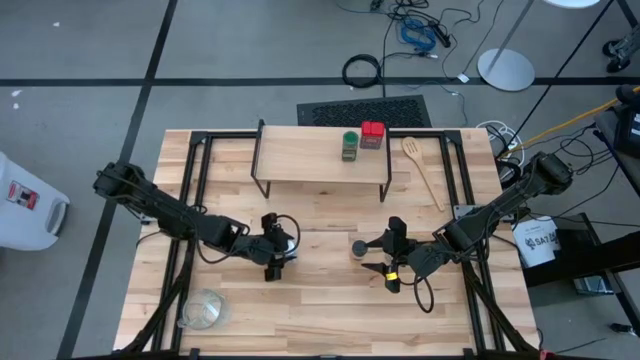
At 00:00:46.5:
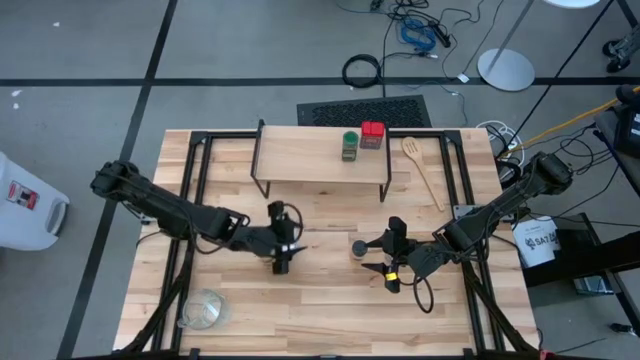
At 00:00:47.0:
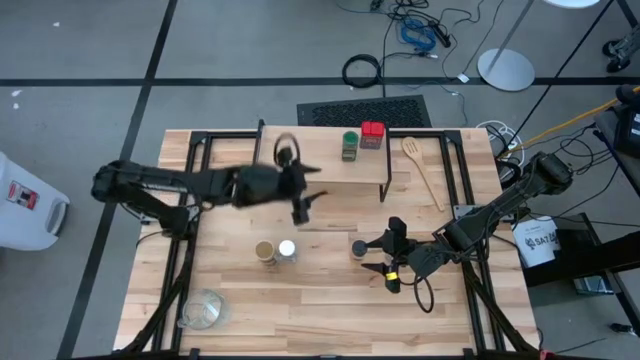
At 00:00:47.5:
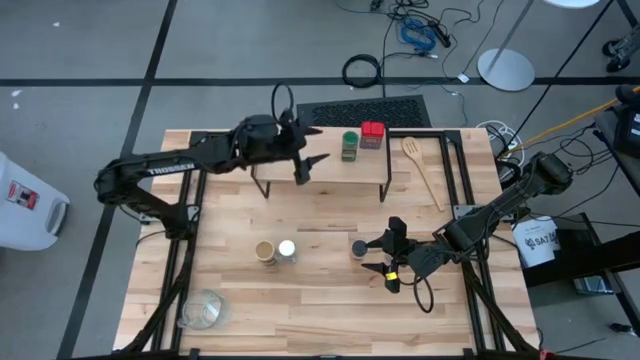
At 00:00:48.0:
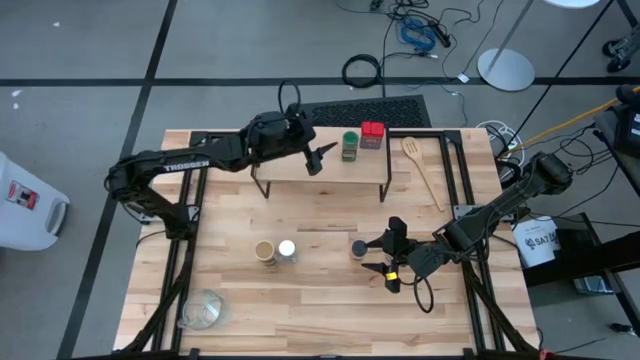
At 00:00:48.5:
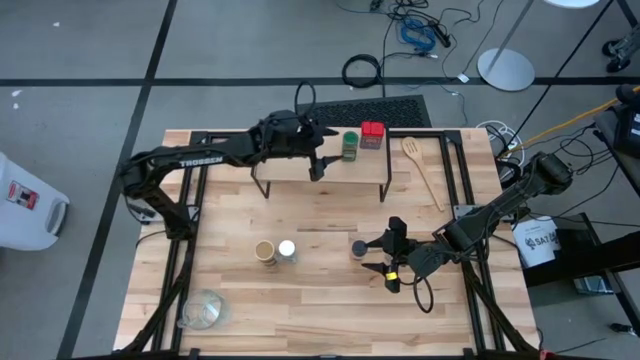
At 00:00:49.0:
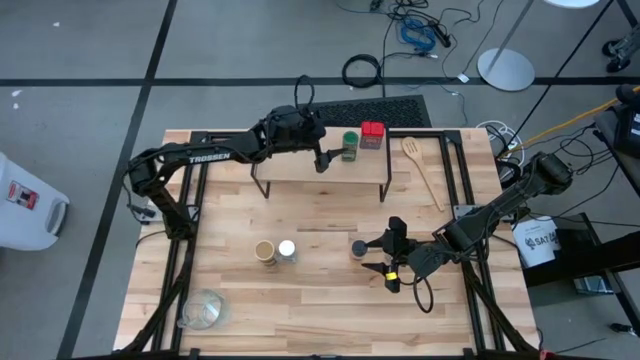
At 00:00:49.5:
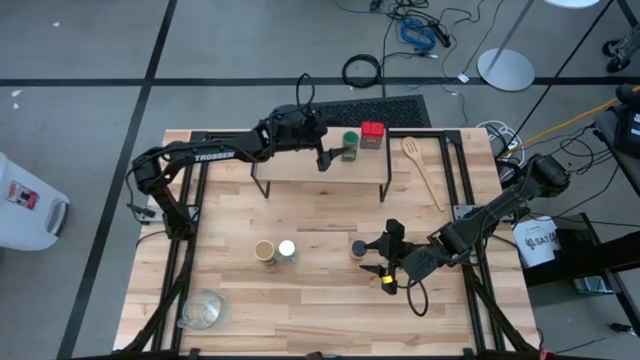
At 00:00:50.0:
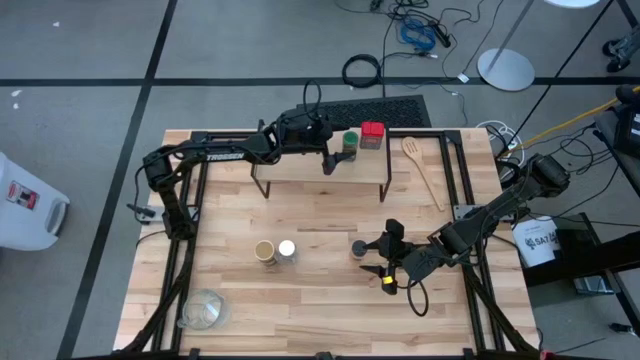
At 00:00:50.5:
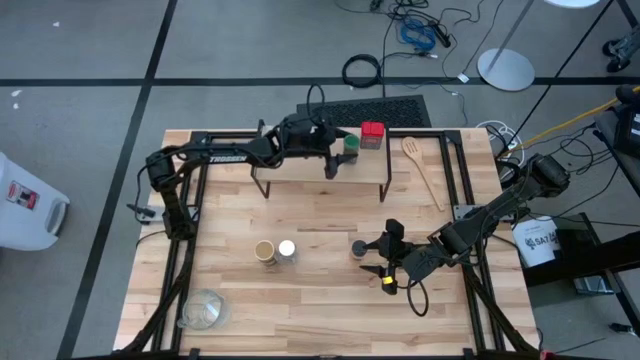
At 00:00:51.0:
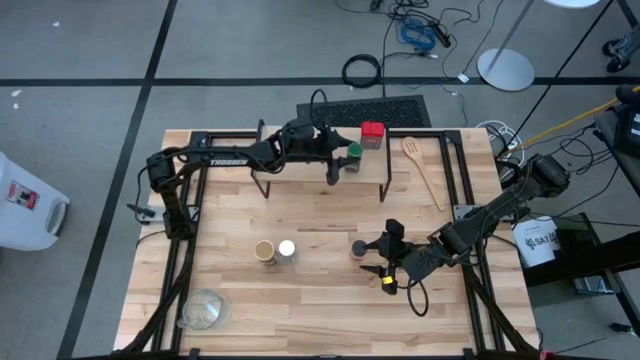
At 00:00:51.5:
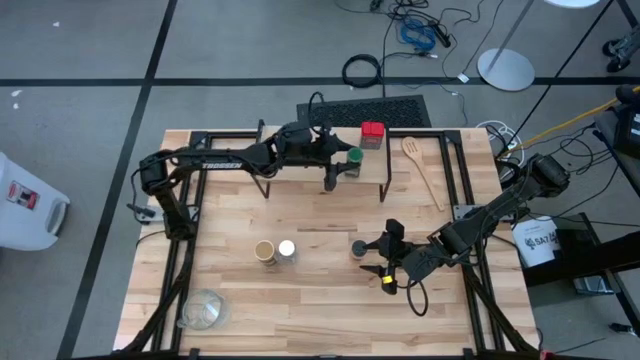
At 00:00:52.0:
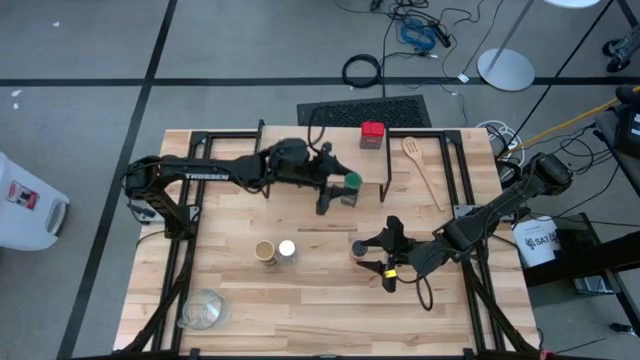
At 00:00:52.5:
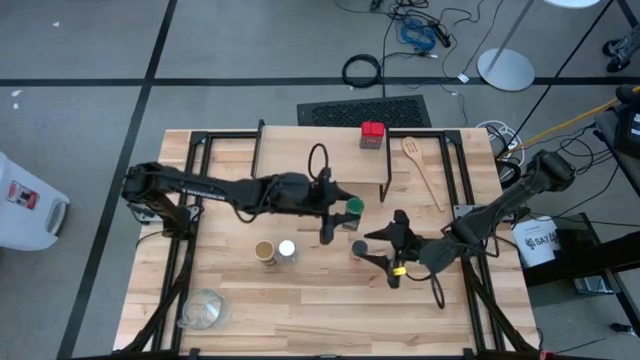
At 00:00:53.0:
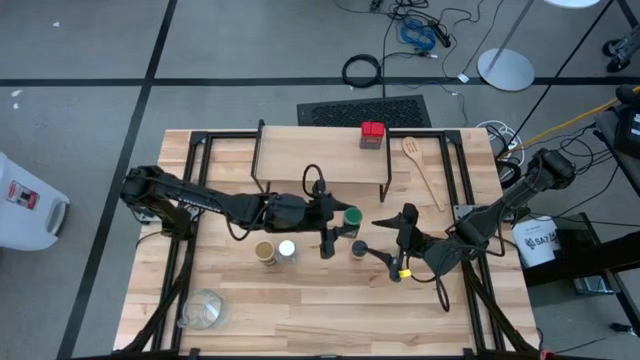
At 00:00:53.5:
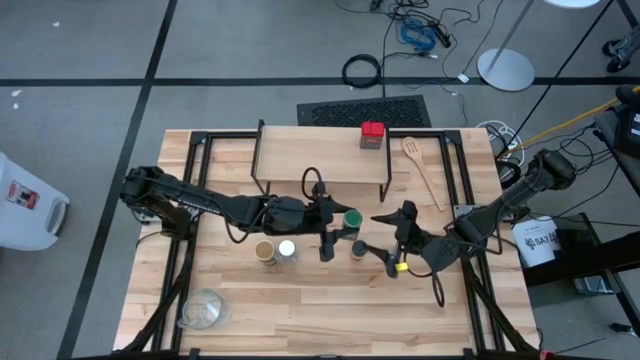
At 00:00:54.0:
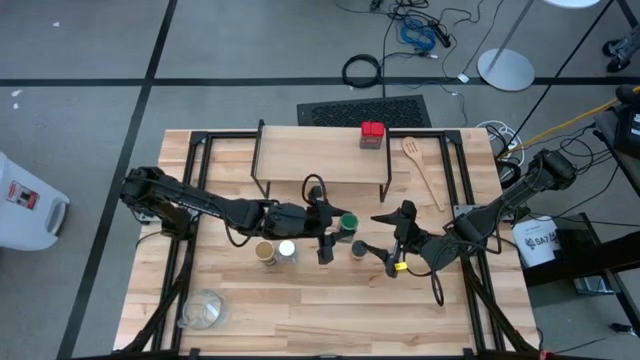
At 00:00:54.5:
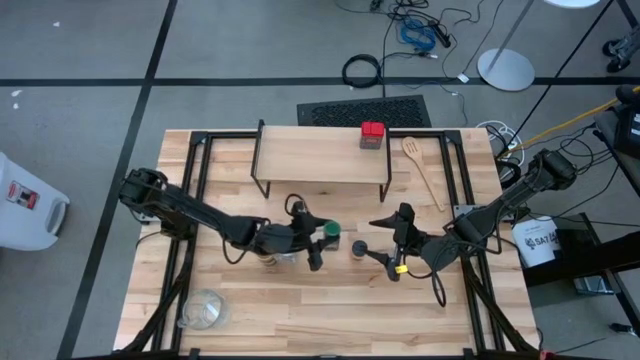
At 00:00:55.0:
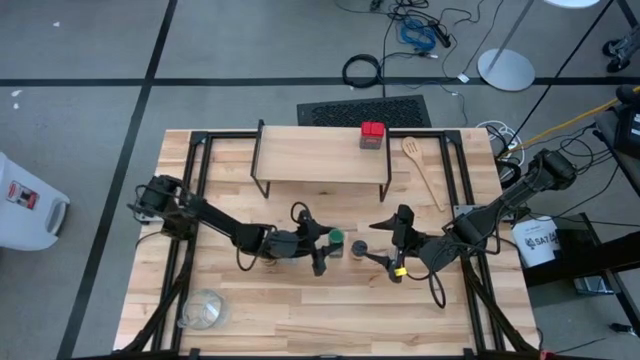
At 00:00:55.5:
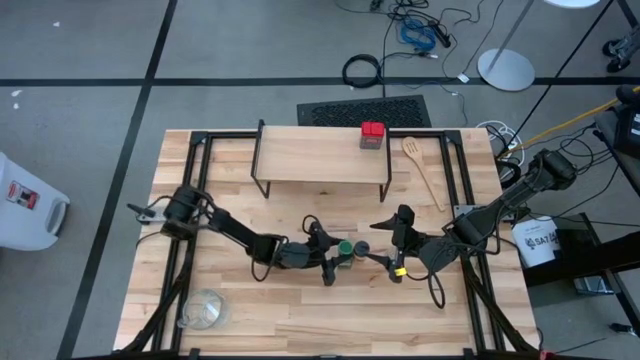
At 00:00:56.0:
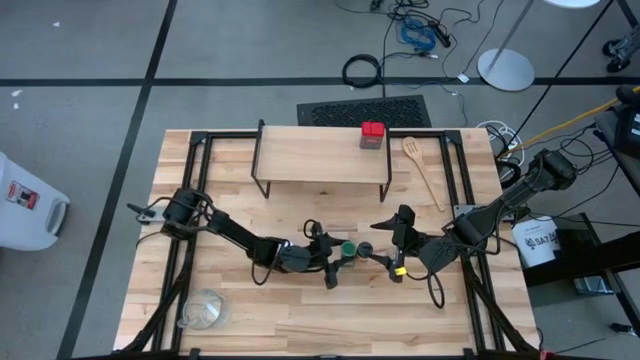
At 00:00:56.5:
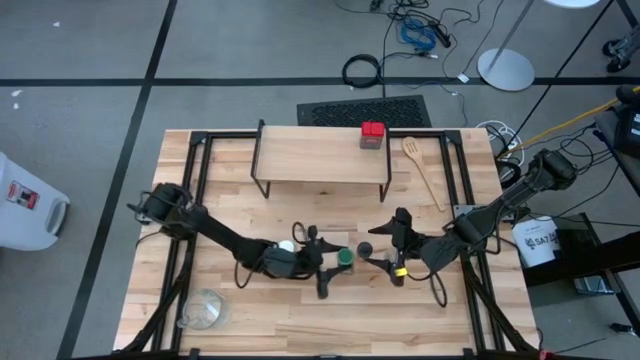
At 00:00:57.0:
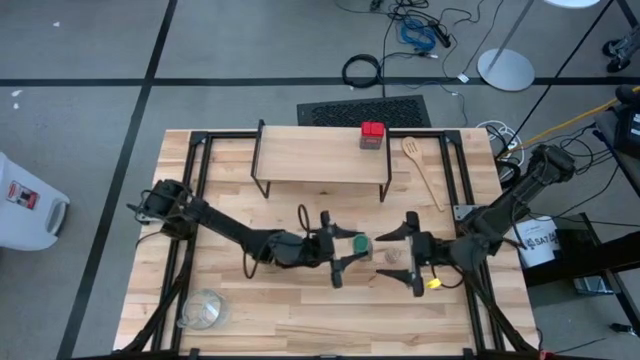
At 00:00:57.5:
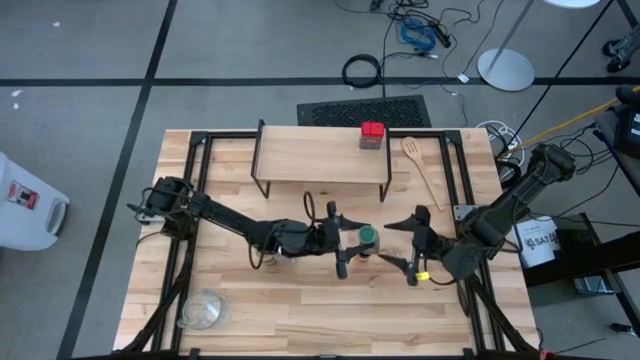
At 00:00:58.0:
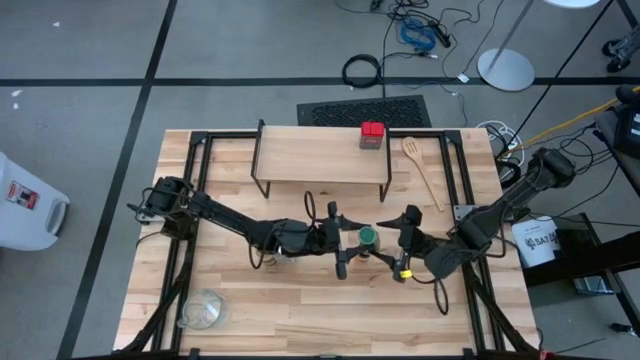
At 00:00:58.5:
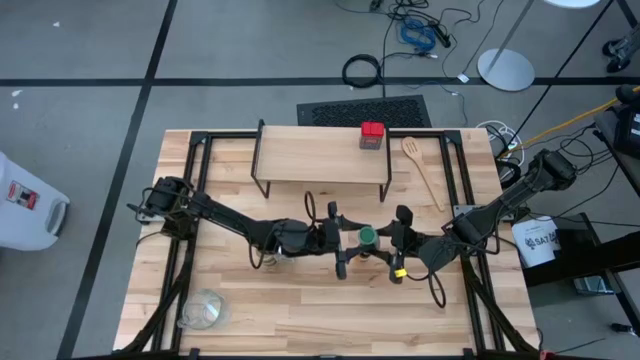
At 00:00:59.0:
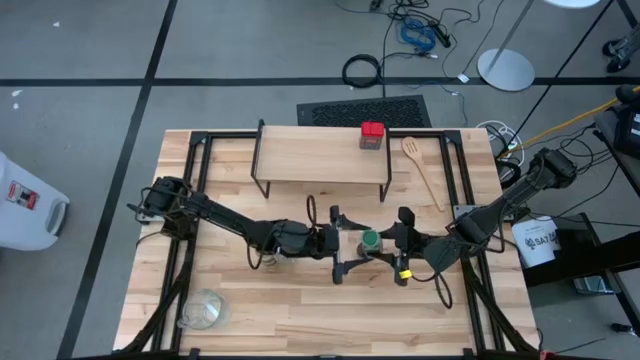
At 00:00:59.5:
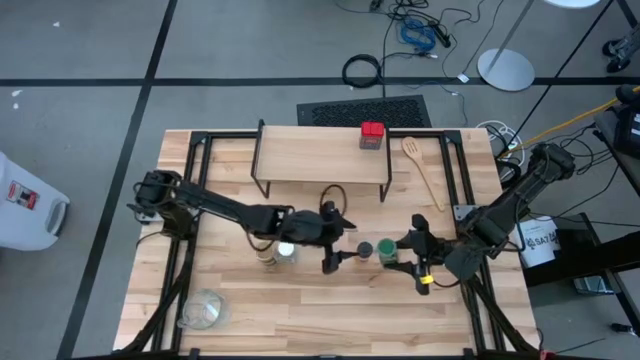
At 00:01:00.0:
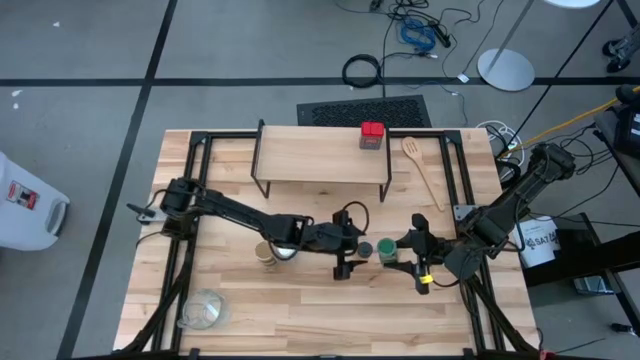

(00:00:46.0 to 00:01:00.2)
Task: Shelf spices
Put the black seasoning bottle in the center of the table and put the green seasoning bottle beside the black seasoning bottle
